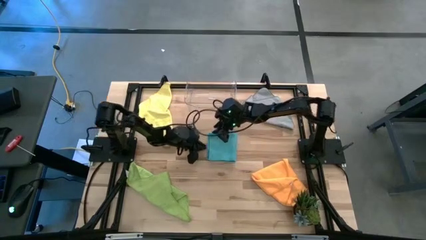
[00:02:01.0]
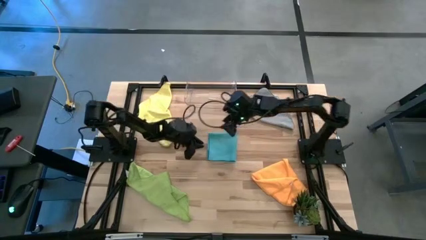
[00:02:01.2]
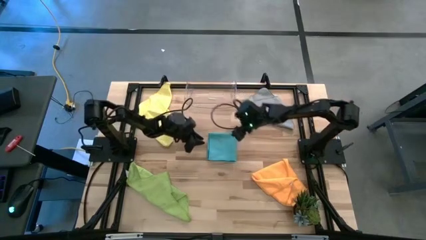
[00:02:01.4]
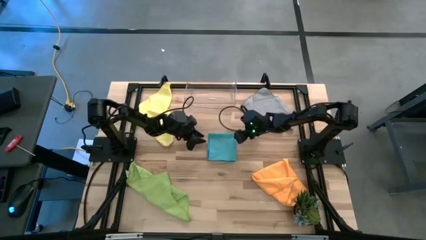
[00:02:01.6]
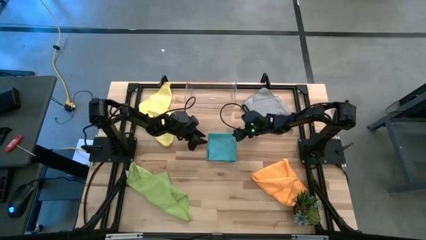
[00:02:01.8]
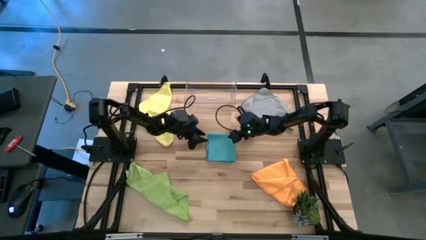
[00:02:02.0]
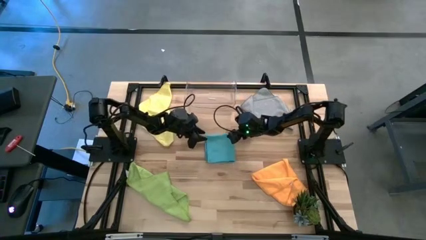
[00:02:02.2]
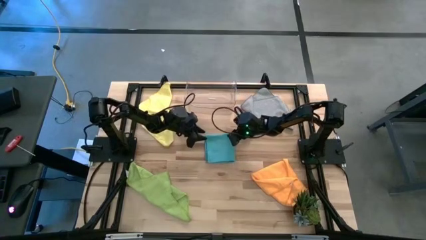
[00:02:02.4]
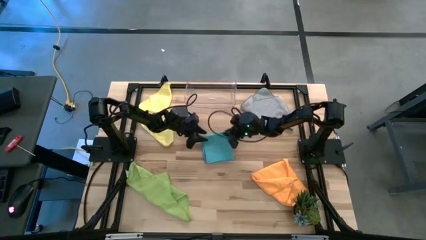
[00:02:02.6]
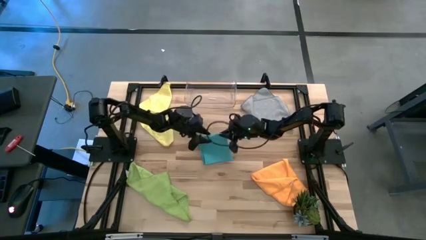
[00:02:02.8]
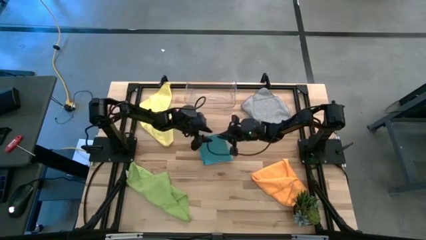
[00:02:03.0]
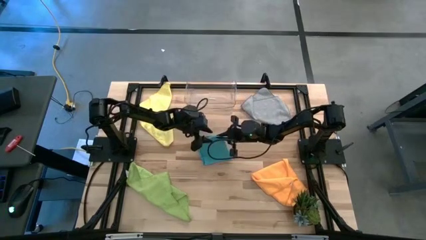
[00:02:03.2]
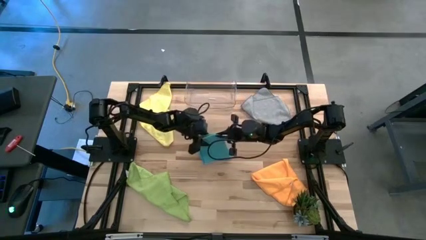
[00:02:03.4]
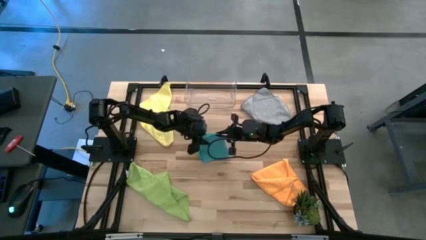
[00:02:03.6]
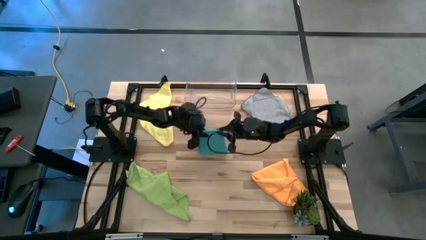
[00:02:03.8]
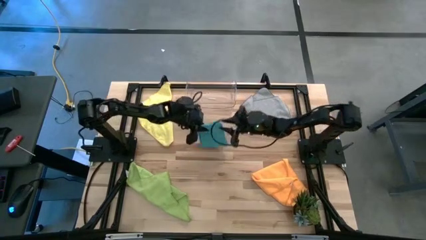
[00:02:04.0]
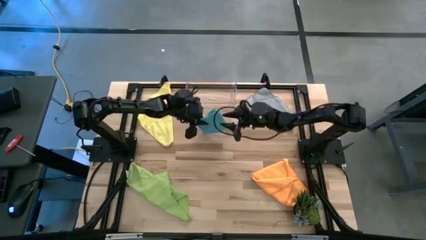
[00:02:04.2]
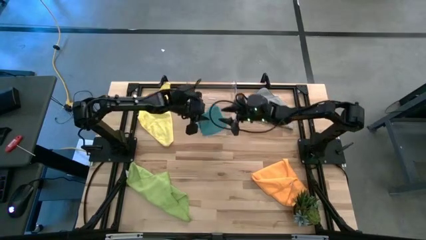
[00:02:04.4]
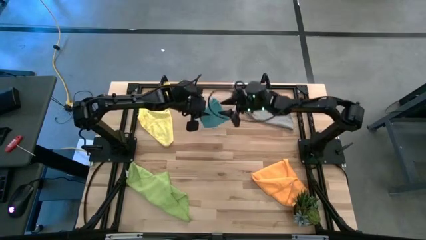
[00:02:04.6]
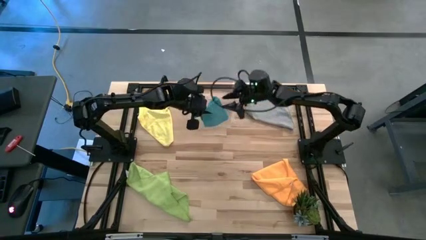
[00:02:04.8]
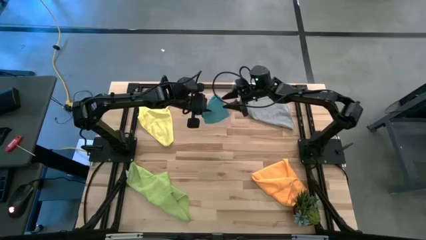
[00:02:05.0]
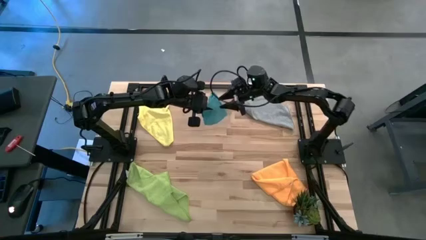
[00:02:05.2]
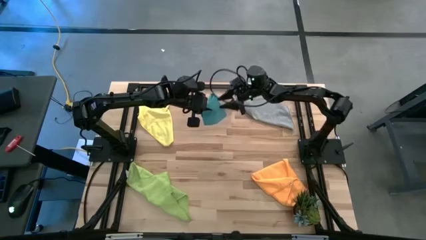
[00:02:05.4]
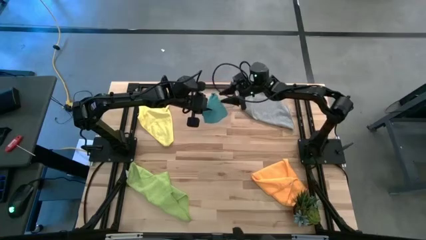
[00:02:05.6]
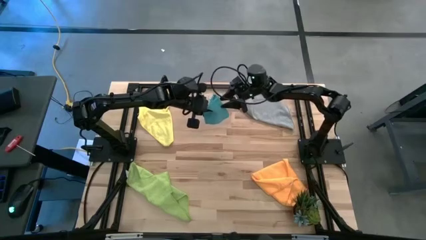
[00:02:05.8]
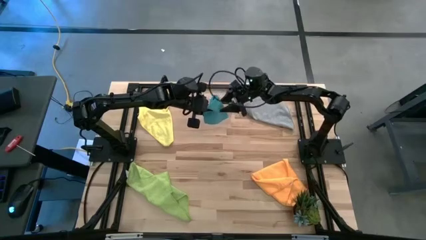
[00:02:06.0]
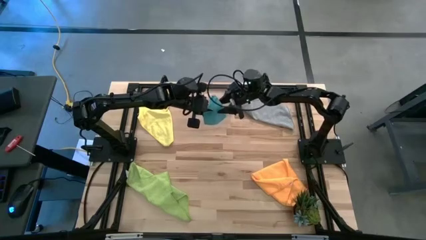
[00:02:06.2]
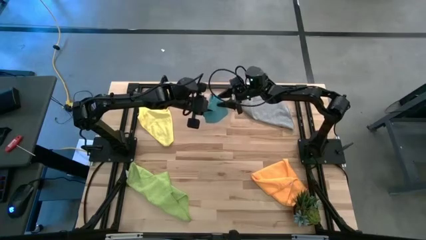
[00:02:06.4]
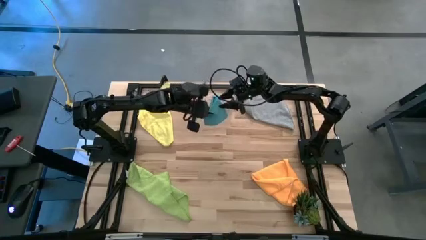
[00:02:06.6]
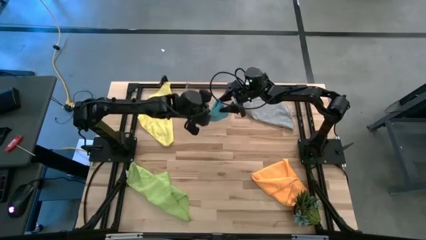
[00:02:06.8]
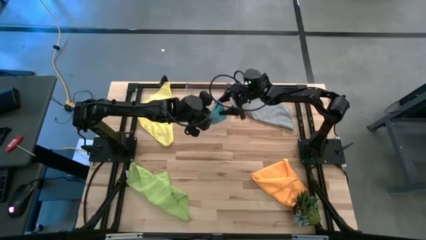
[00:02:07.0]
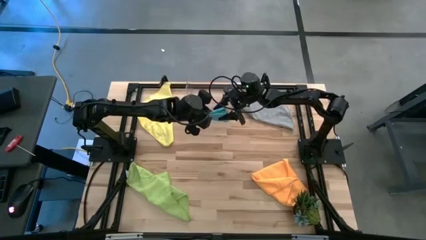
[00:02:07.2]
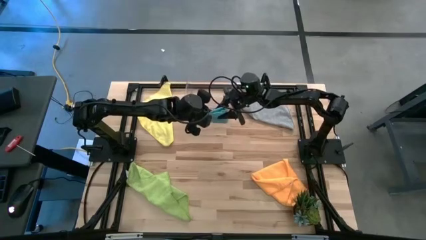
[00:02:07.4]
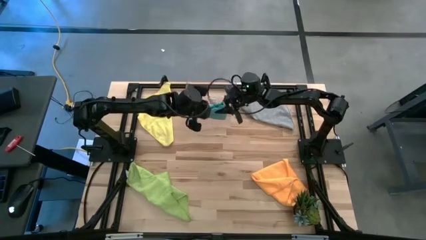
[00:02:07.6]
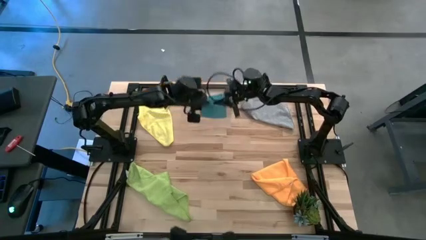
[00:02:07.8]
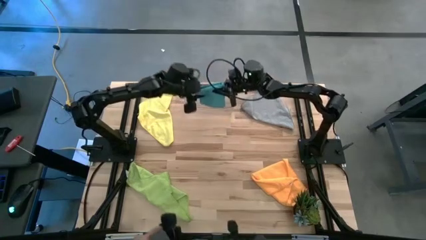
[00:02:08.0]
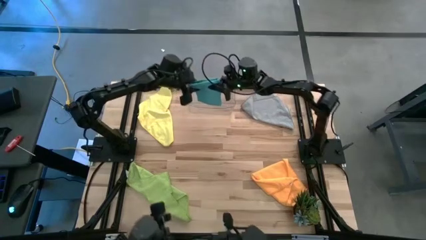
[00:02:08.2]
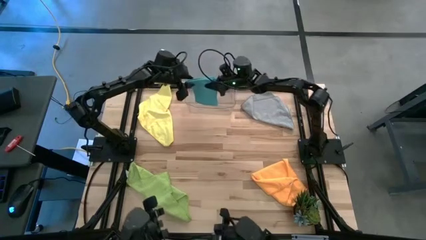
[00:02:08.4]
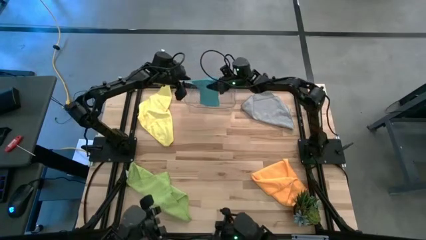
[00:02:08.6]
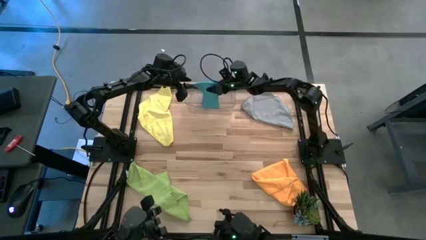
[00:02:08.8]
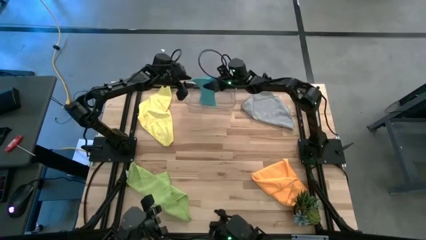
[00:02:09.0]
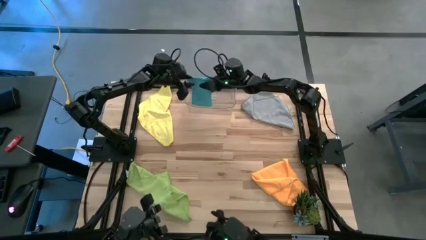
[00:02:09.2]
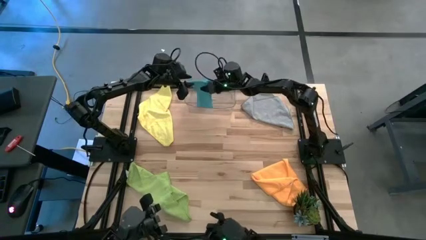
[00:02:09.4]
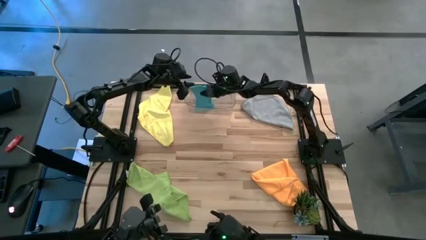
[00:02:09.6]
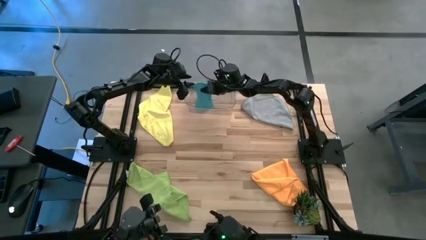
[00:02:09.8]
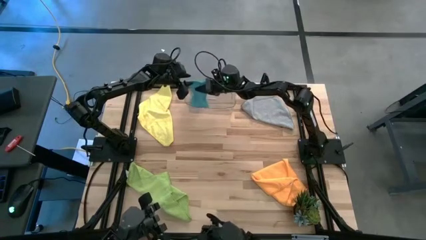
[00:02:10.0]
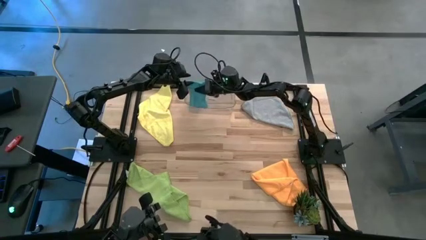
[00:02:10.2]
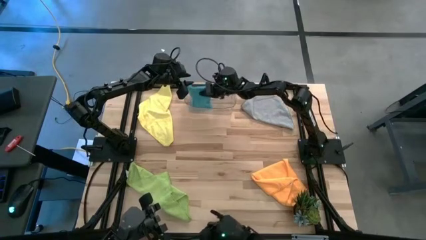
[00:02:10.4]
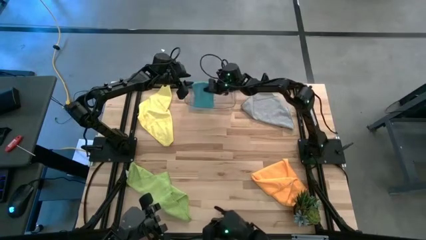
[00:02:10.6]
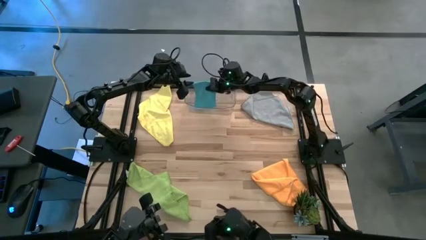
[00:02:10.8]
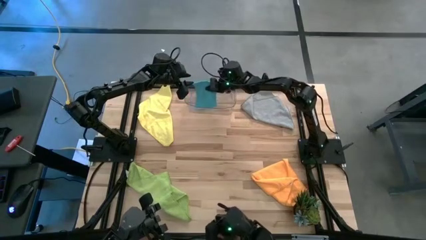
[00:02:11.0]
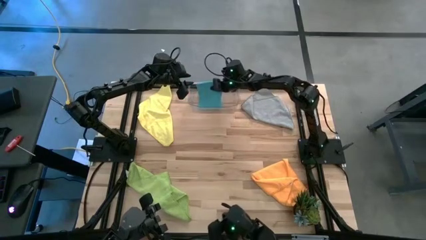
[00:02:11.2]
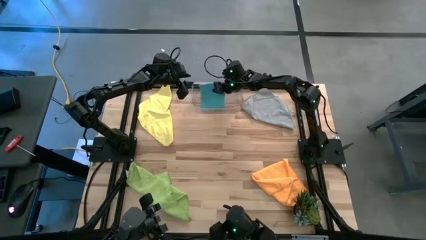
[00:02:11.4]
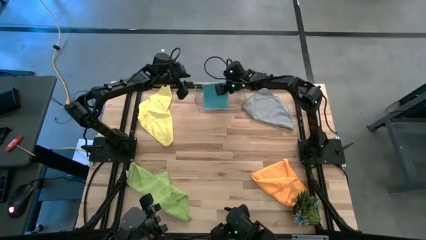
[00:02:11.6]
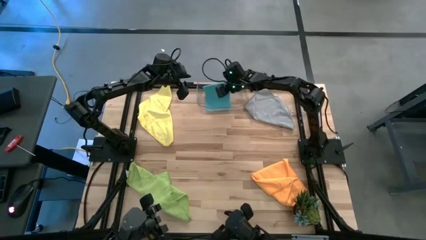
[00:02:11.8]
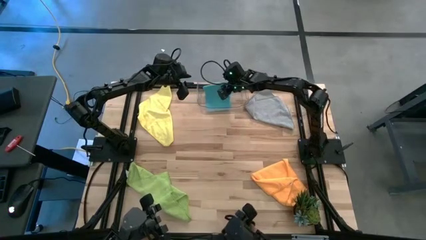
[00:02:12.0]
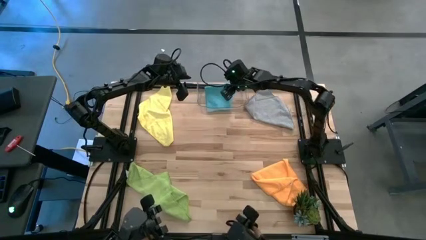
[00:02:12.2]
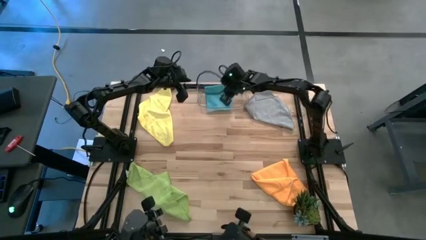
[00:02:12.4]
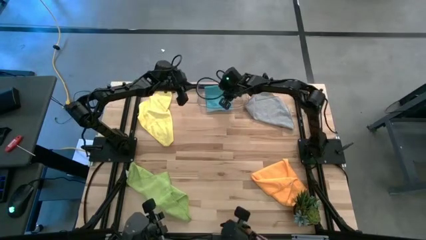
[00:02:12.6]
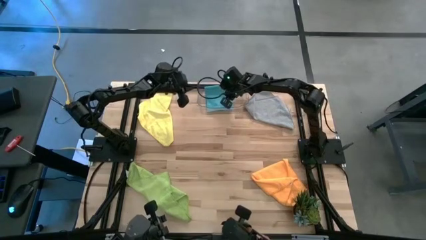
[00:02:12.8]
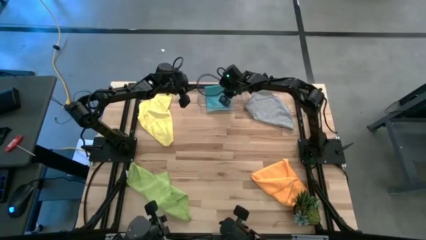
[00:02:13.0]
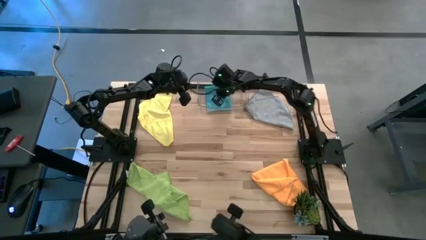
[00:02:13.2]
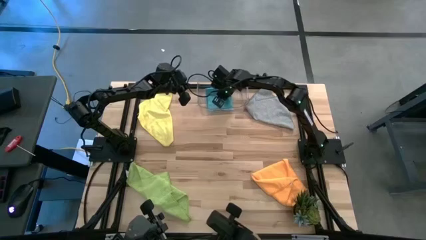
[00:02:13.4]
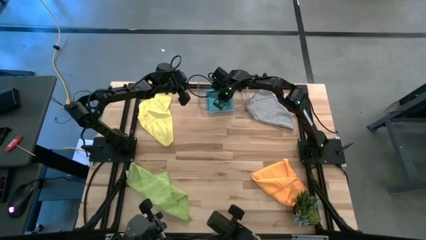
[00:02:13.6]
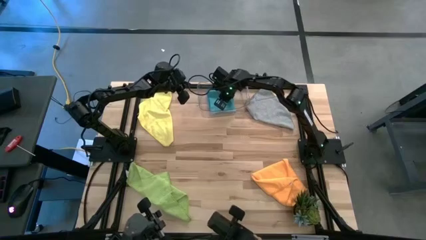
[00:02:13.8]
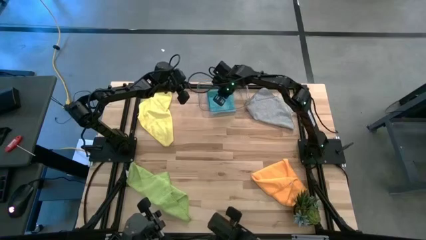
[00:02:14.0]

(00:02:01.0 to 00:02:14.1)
Task: Fold microfiber towels
Put the blue towel into the transparent bin

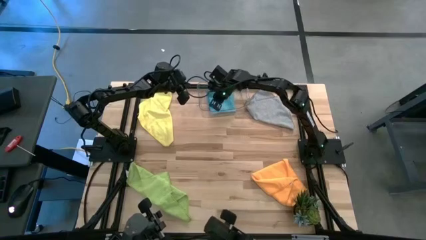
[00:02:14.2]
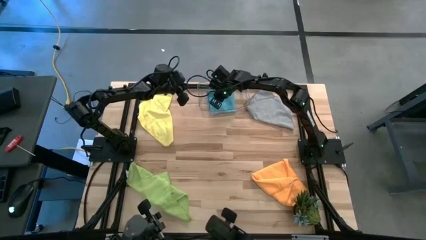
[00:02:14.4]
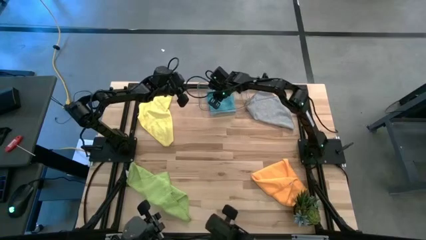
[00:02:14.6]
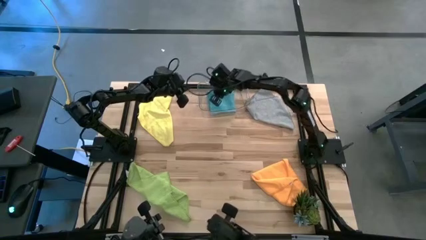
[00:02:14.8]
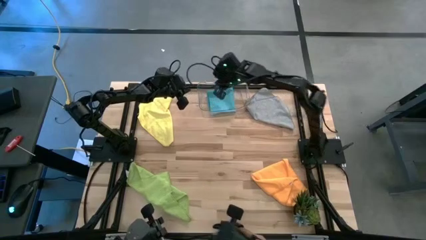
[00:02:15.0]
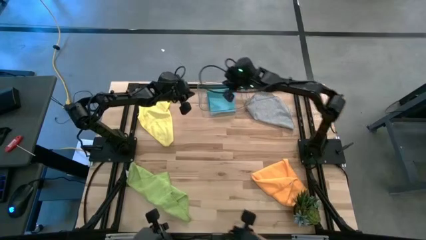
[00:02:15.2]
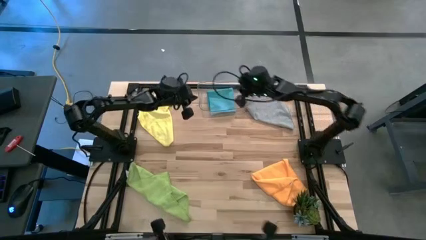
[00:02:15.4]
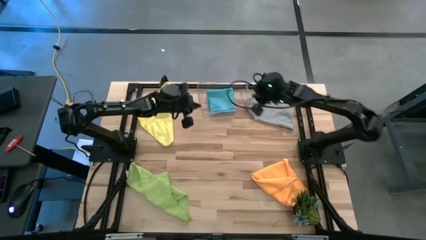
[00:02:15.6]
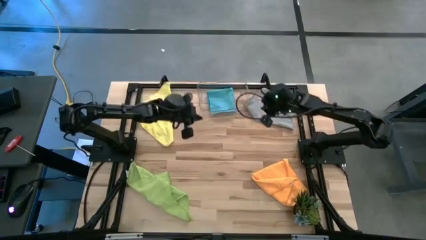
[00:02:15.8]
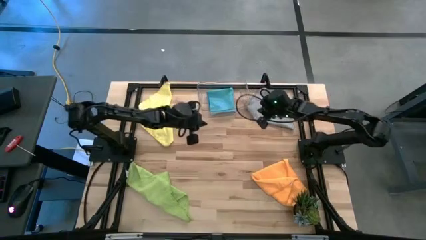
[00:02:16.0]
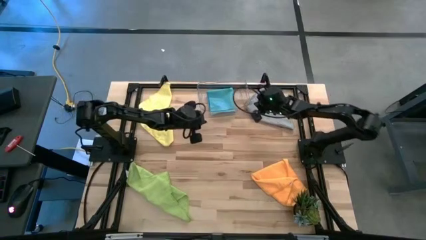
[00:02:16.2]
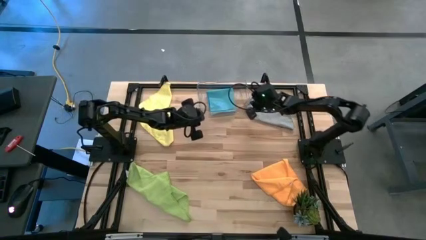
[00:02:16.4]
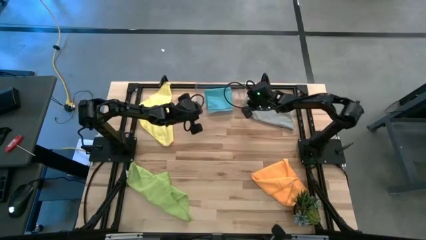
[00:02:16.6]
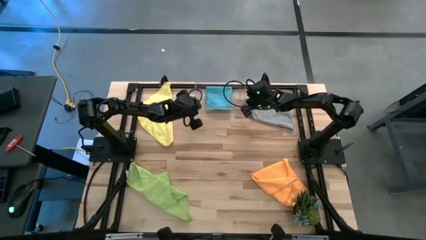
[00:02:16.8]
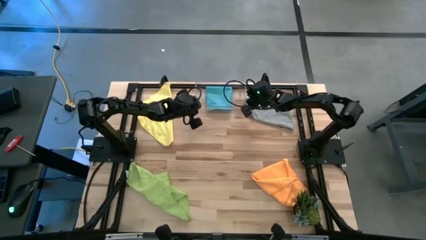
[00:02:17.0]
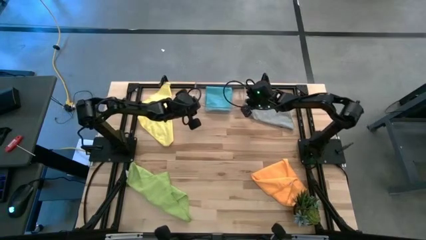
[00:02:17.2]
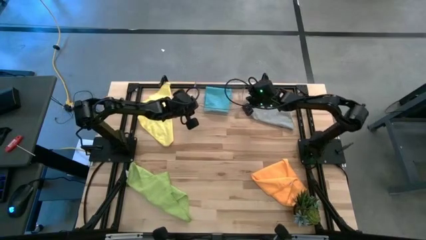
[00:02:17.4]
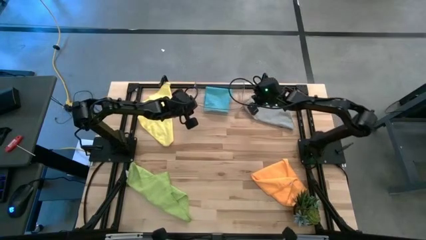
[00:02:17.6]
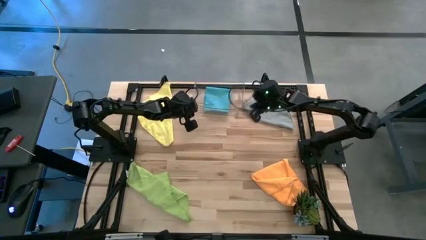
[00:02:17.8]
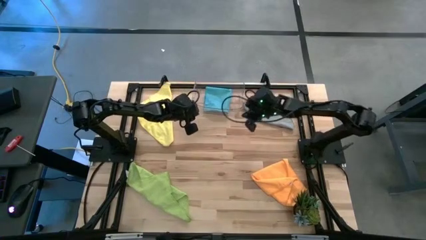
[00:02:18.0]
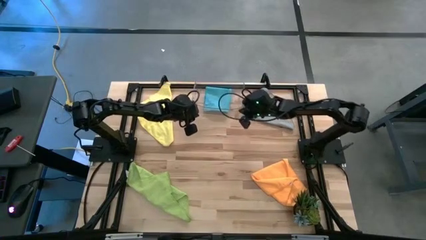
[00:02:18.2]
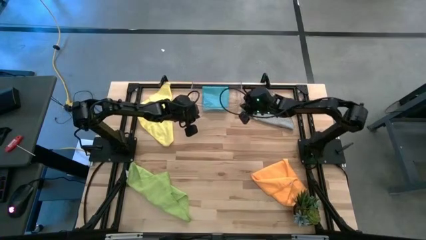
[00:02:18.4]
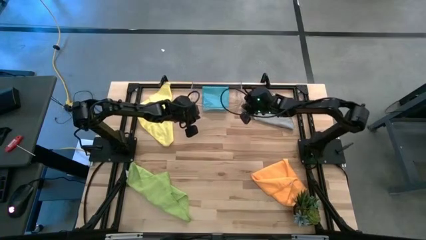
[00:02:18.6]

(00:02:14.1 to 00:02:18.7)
Adjust the transparent bin
